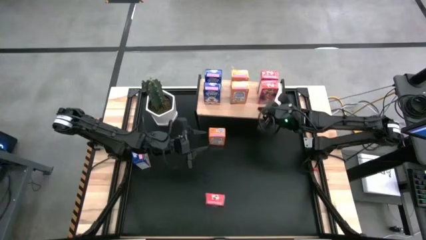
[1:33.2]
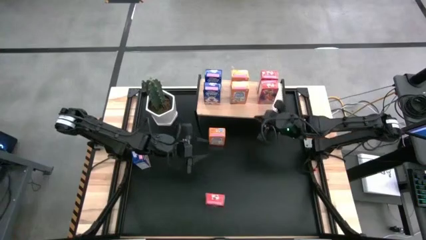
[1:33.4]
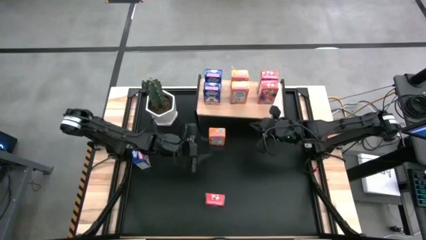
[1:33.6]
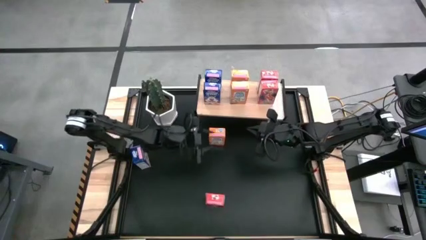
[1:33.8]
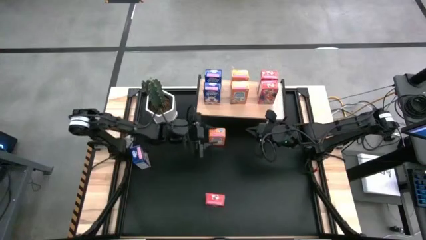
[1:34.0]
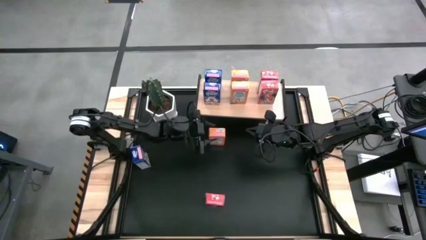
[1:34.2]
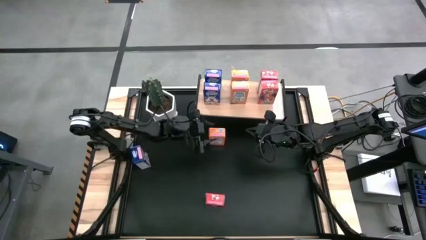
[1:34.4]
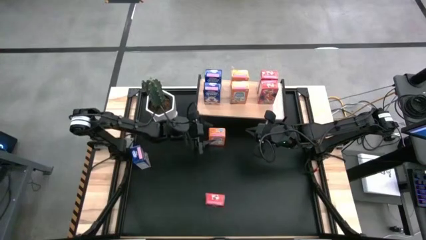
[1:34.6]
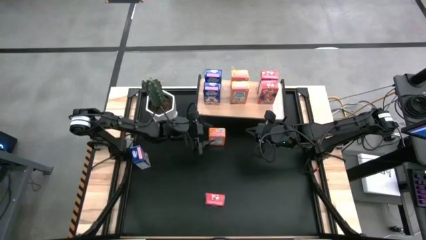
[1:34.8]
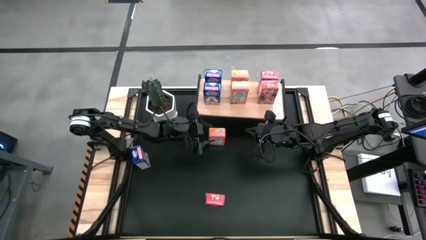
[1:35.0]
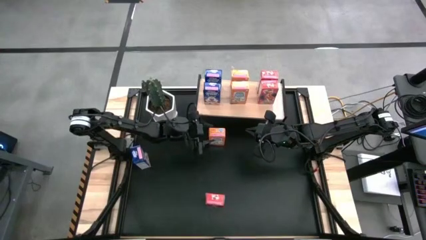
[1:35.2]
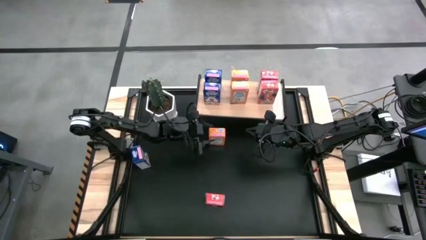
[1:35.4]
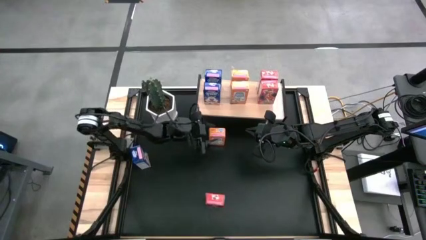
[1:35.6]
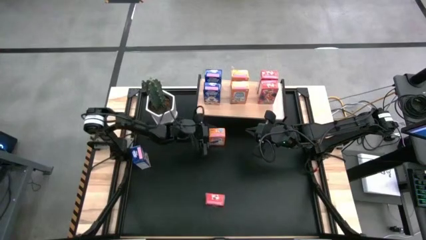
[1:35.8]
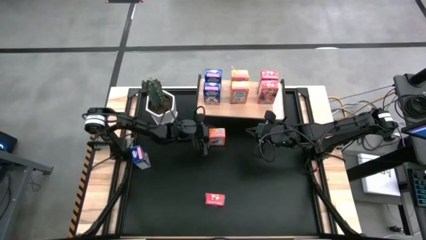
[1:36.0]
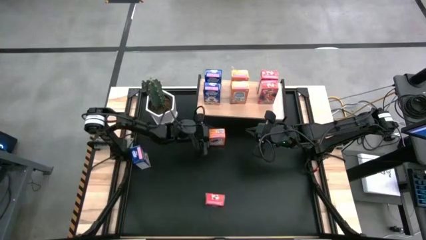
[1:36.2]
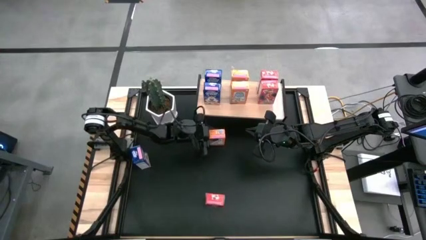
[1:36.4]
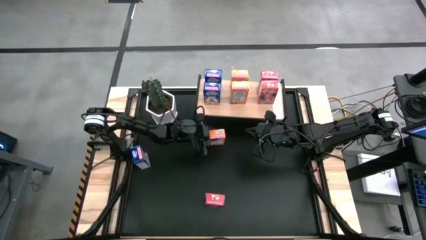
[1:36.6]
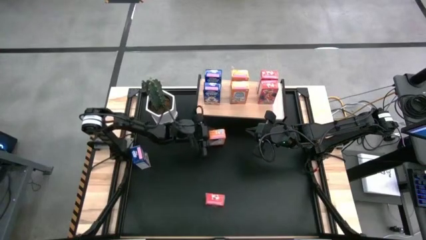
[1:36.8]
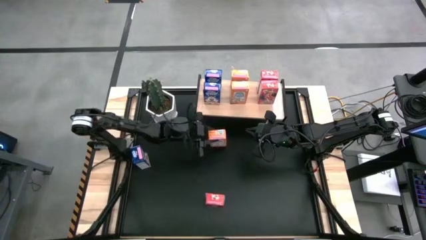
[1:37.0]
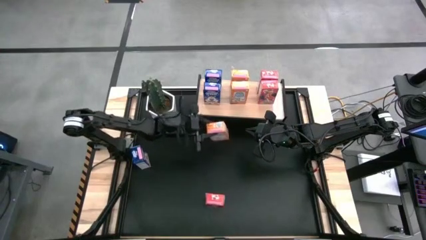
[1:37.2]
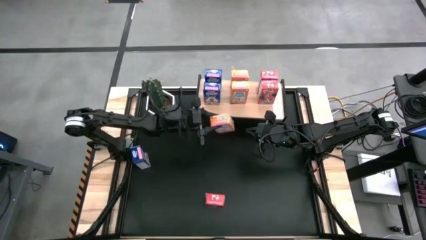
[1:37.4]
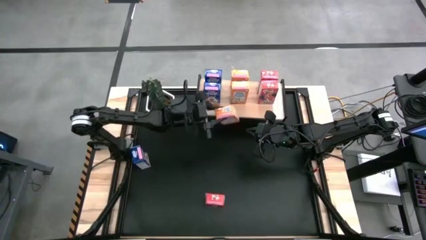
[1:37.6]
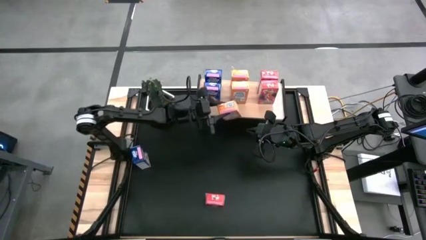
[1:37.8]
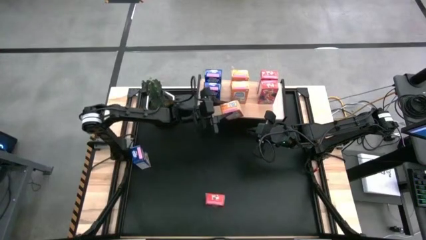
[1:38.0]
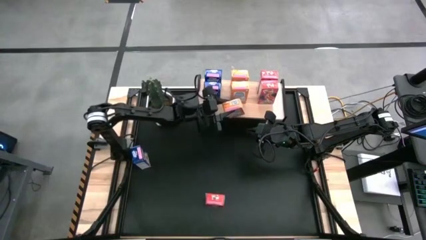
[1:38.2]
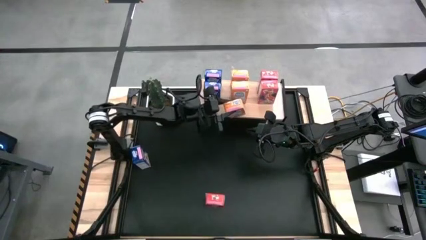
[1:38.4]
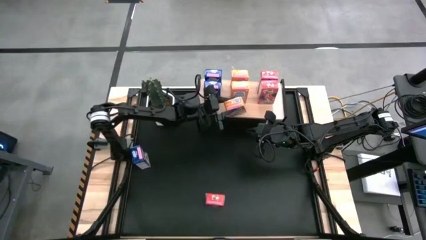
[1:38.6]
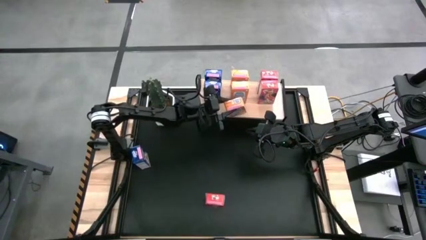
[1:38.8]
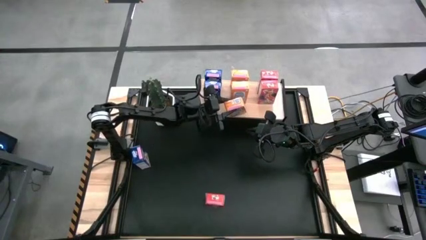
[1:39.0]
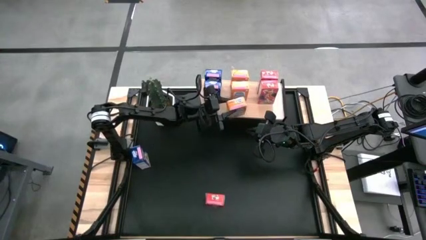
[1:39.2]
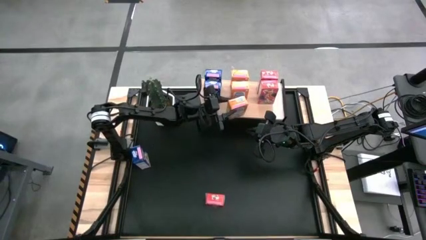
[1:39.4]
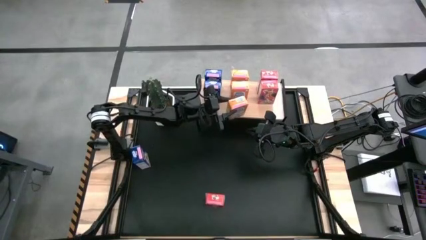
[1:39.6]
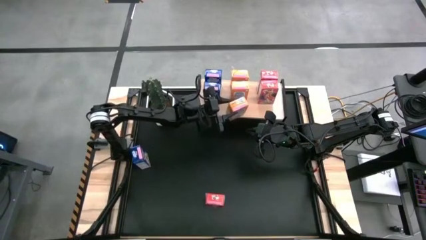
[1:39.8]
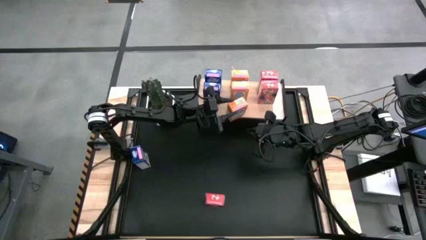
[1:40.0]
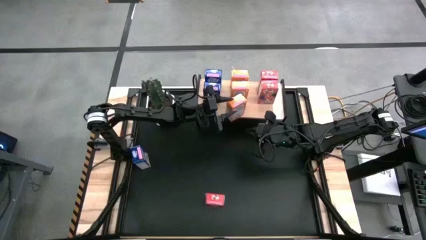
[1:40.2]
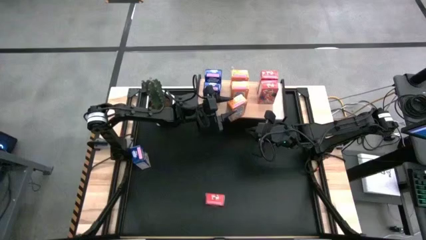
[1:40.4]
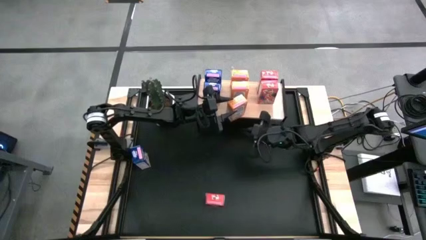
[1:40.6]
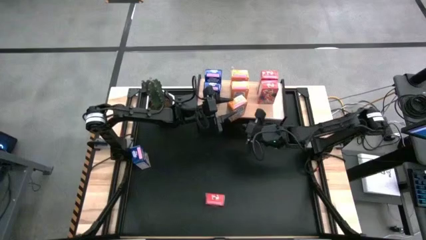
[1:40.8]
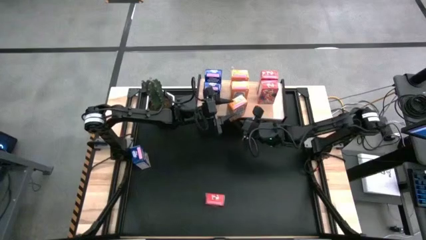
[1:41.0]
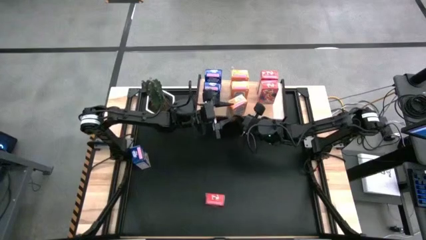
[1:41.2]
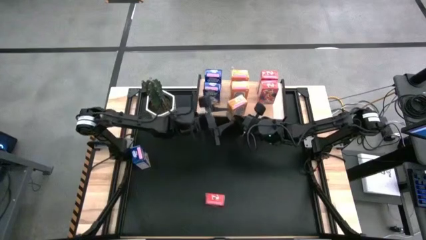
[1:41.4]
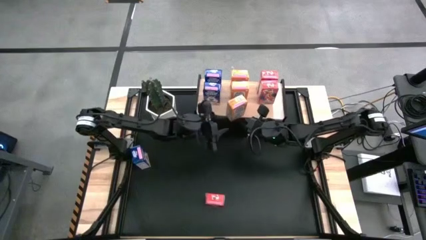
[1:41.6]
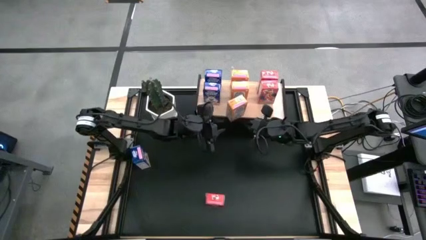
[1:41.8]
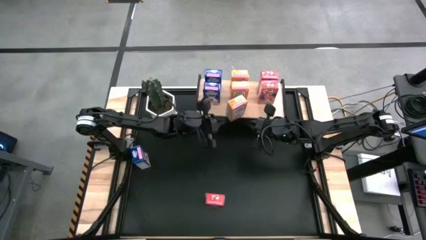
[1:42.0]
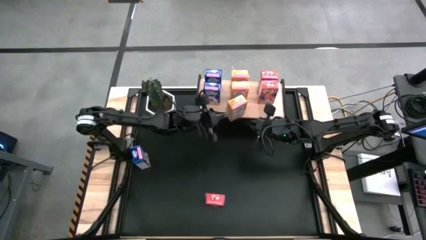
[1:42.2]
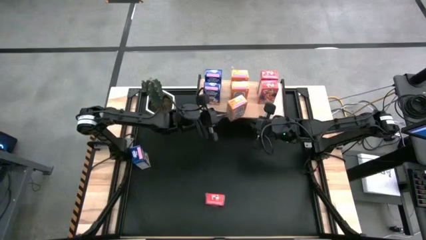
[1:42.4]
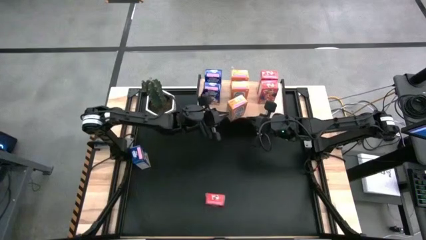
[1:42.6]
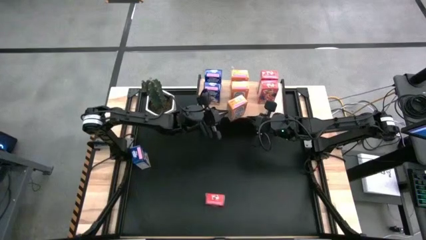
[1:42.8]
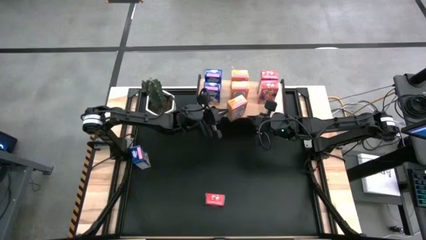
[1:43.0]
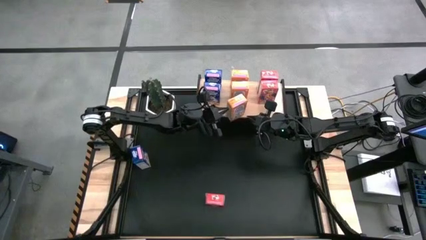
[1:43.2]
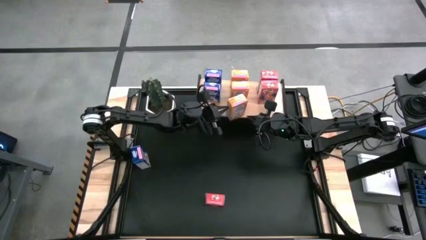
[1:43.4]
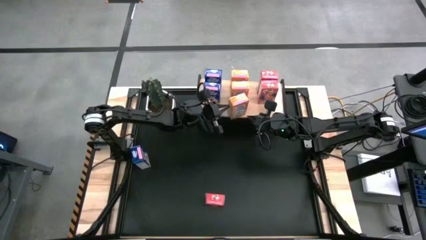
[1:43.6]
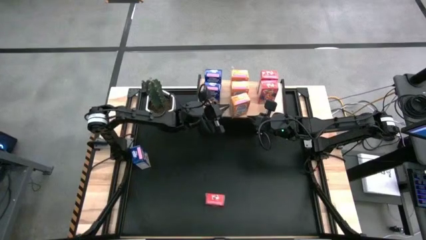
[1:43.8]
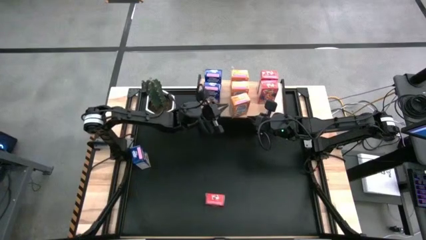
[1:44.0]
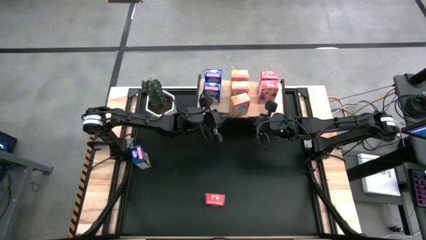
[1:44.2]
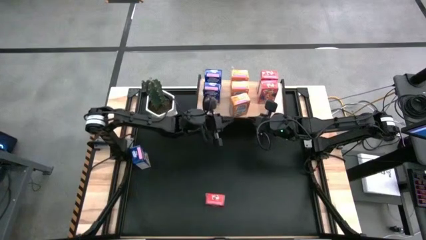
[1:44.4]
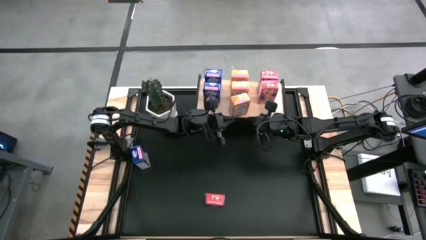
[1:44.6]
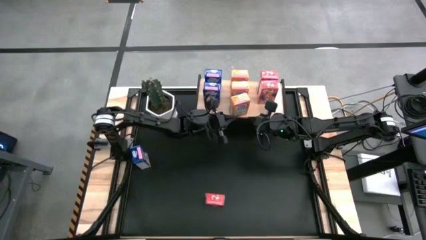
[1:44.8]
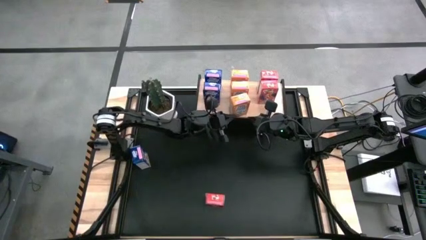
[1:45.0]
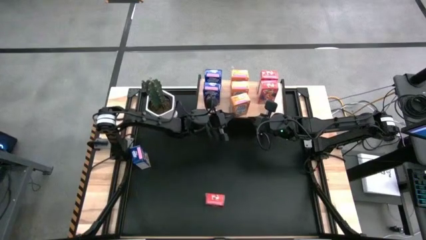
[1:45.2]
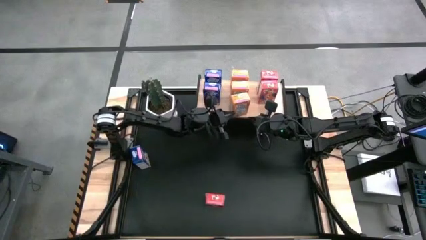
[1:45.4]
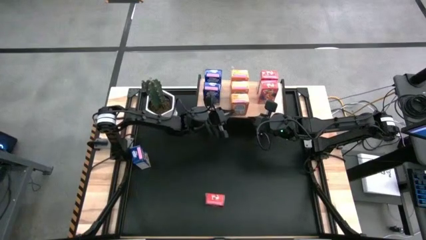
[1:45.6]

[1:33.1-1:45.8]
Task: Stack cereal on shelf
Put the orange cereal box on the shelf

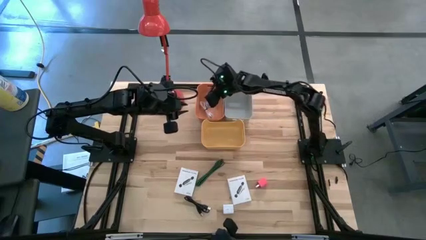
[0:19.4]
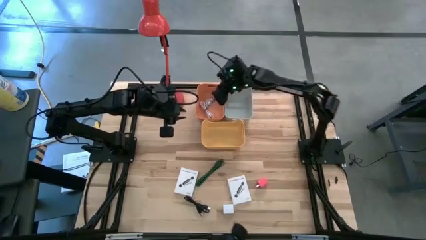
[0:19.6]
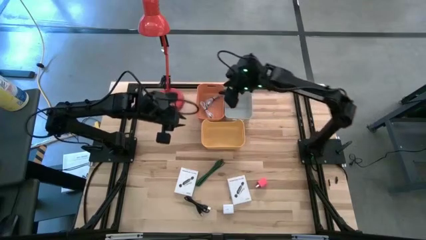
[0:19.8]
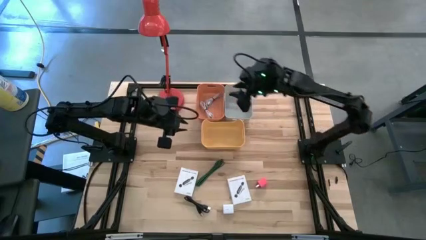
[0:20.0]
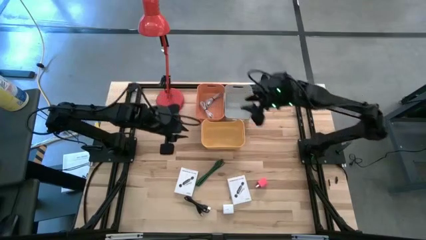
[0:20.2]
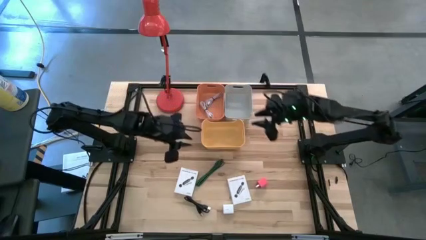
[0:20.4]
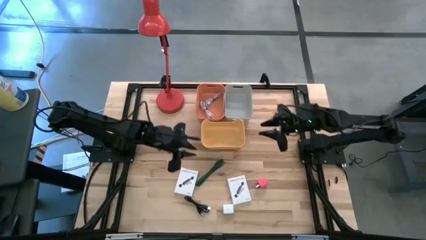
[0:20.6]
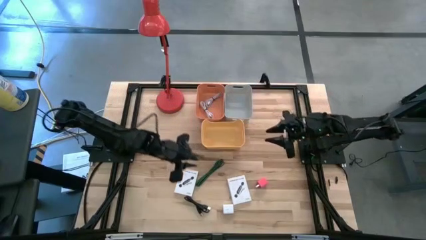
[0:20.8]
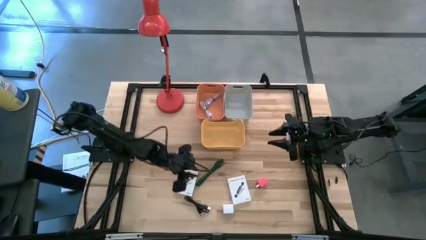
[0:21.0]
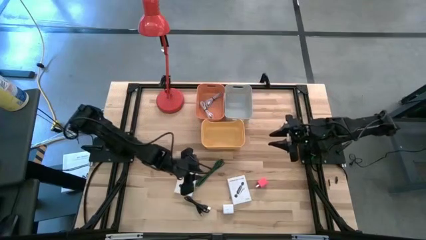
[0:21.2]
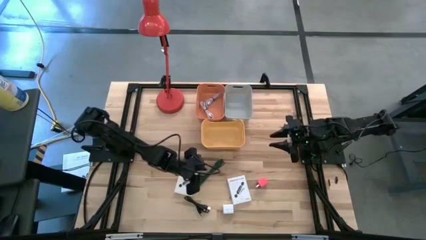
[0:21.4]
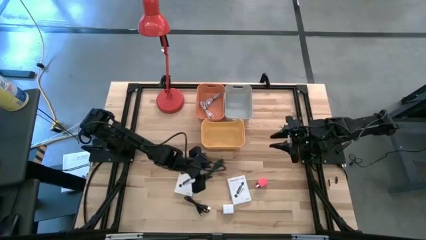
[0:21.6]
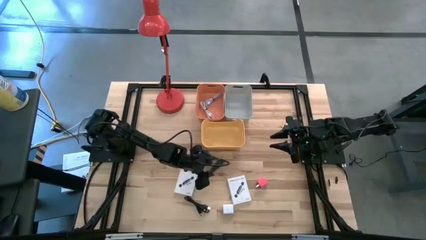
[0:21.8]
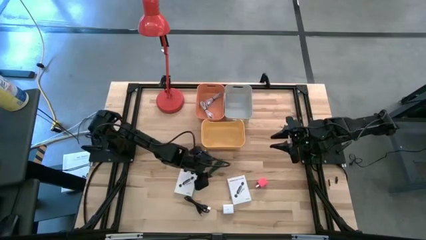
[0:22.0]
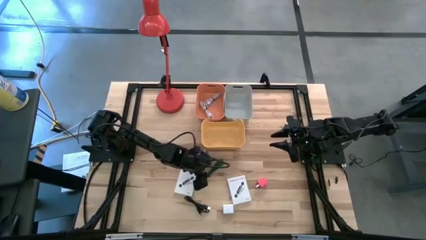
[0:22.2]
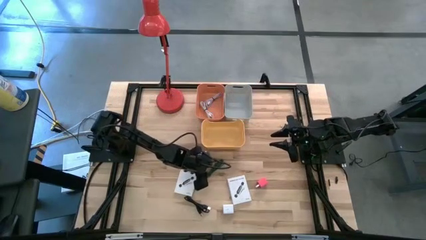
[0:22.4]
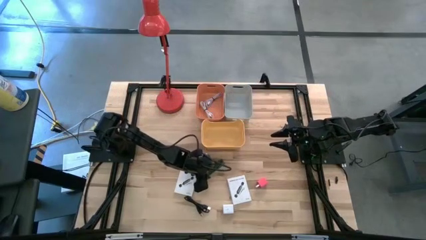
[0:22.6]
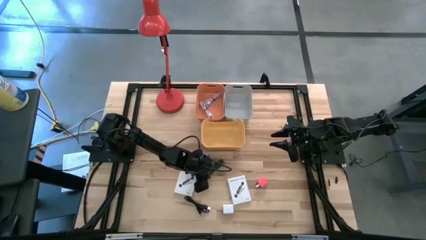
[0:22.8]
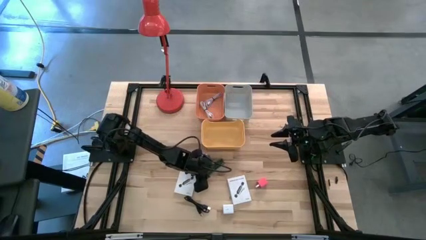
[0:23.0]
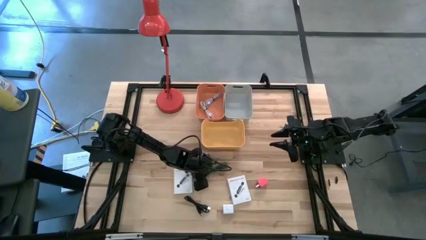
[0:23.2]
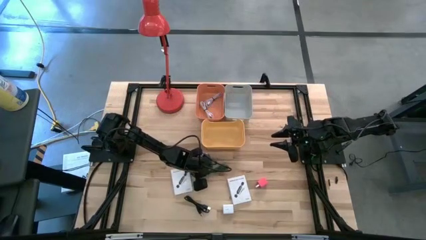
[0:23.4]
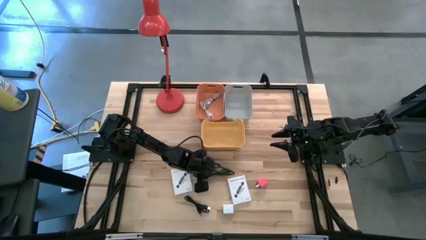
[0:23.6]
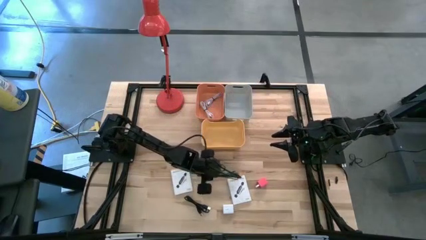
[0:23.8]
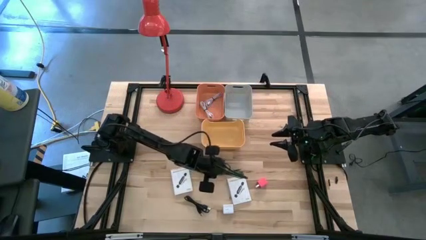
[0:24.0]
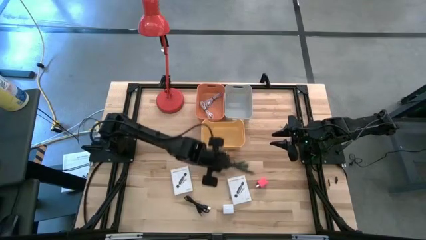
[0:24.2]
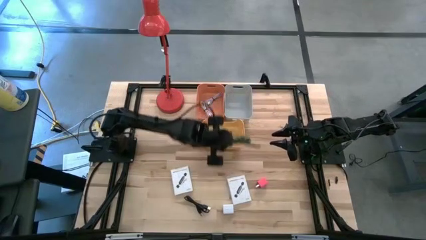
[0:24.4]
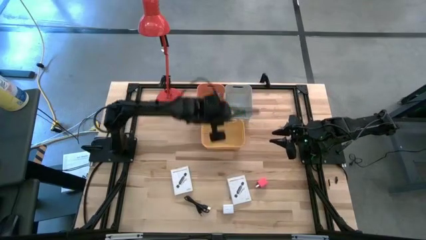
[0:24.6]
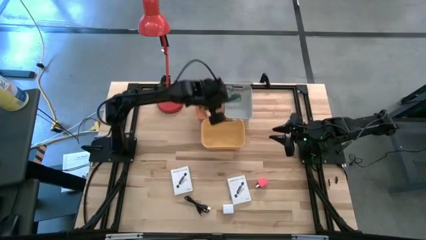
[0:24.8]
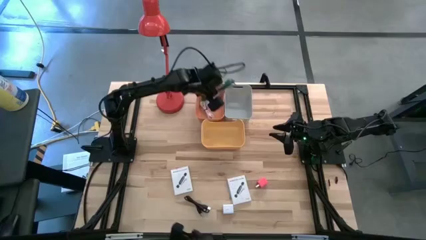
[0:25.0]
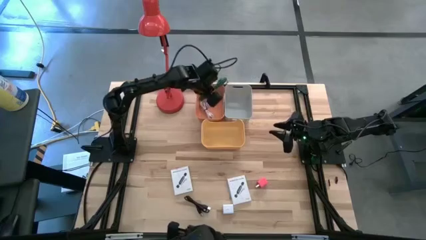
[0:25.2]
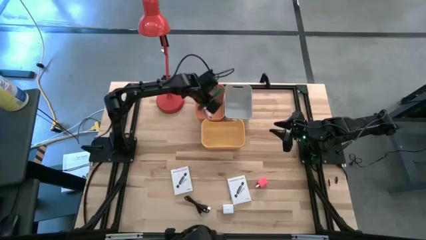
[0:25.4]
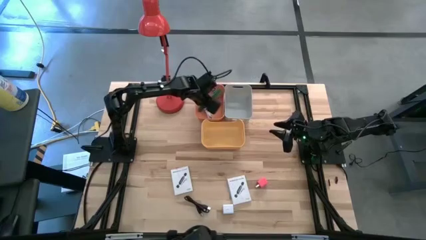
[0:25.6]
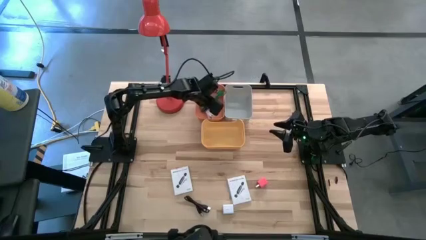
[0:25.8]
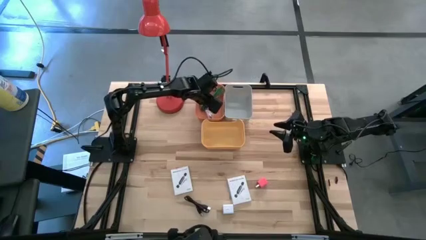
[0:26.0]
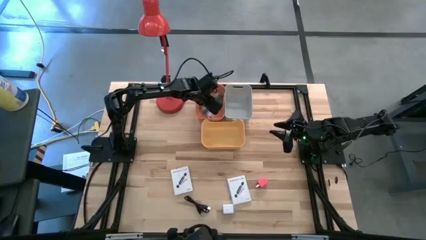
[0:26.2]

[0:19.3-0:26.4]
Task: Pick and place items into bin
Put the green charger cable into the orange bin
